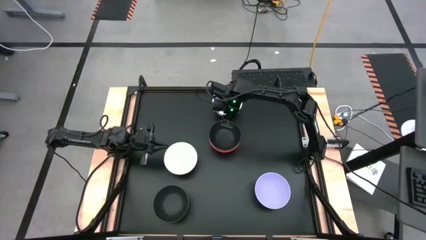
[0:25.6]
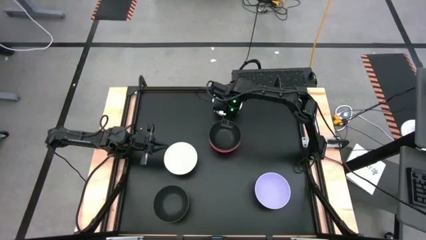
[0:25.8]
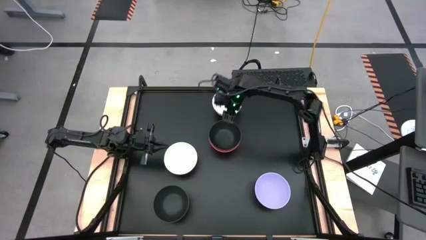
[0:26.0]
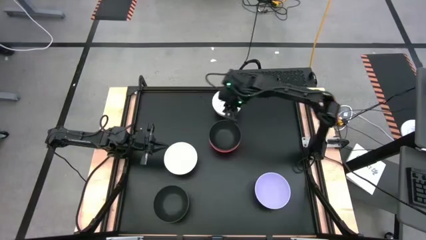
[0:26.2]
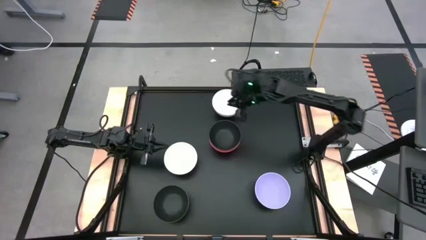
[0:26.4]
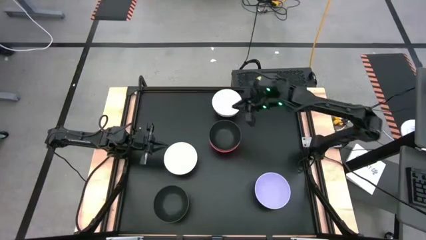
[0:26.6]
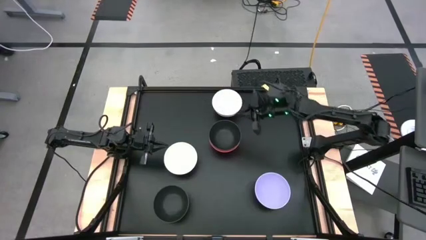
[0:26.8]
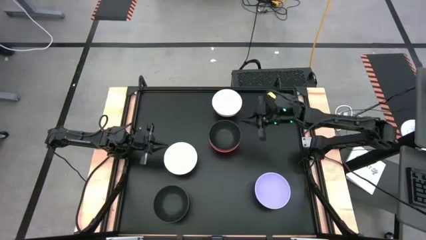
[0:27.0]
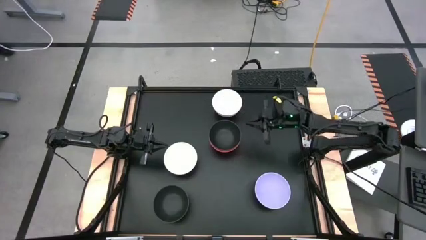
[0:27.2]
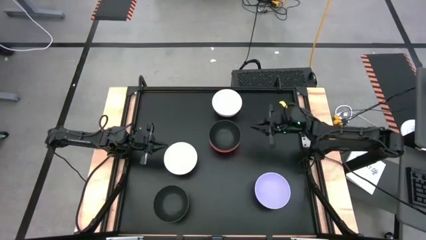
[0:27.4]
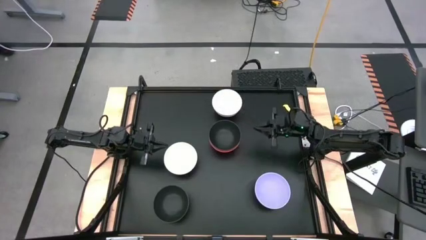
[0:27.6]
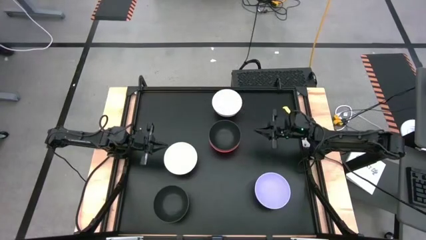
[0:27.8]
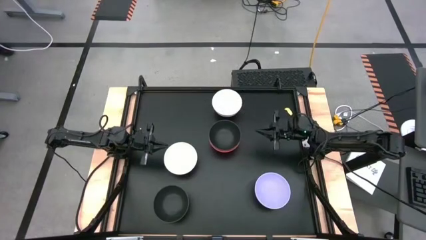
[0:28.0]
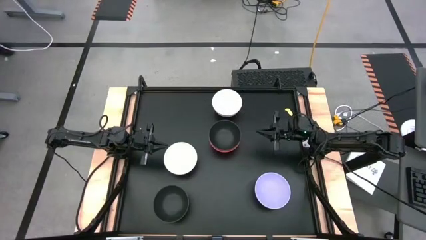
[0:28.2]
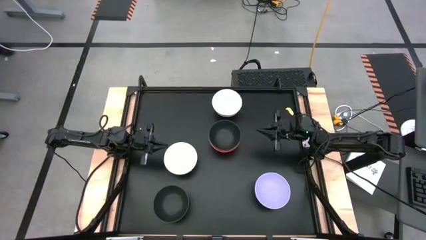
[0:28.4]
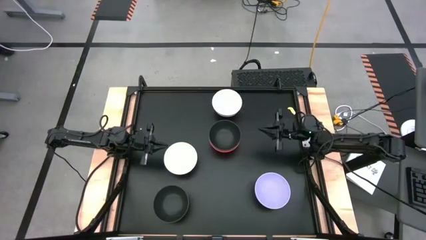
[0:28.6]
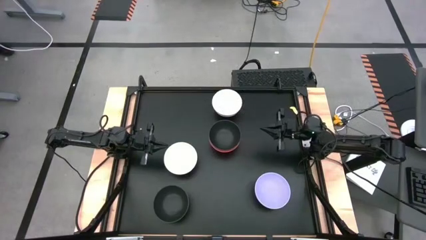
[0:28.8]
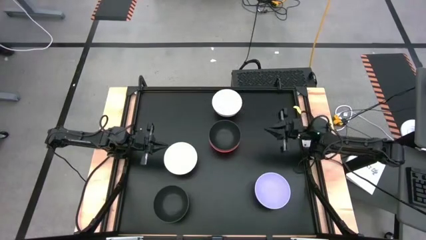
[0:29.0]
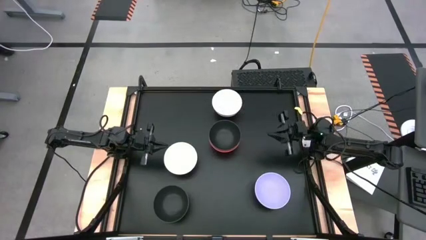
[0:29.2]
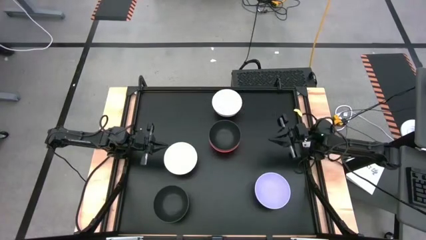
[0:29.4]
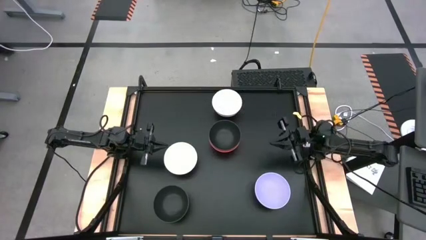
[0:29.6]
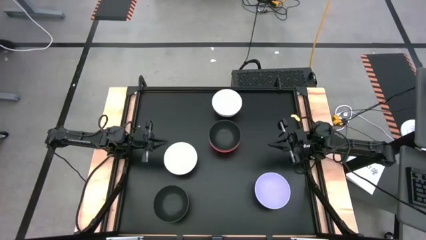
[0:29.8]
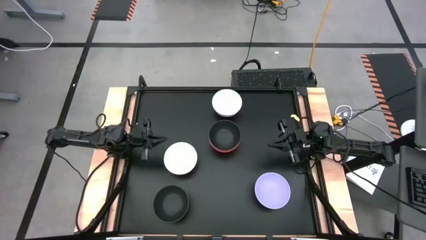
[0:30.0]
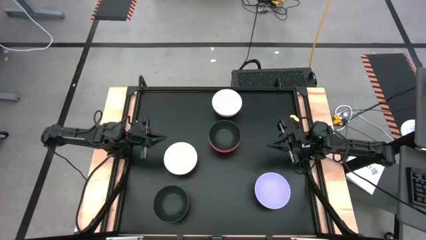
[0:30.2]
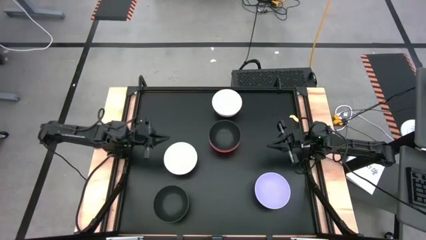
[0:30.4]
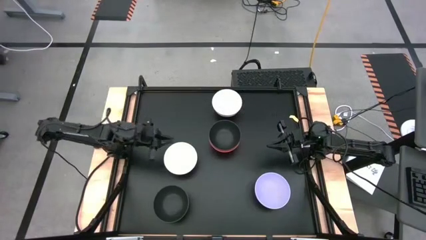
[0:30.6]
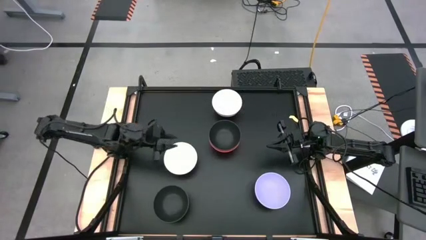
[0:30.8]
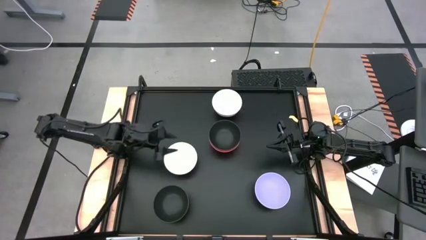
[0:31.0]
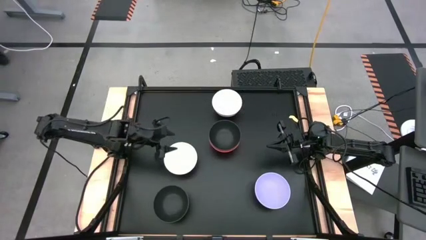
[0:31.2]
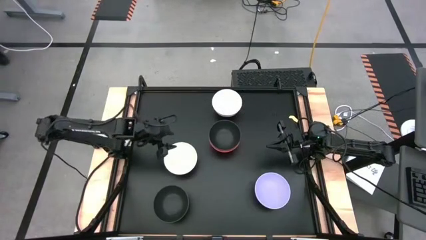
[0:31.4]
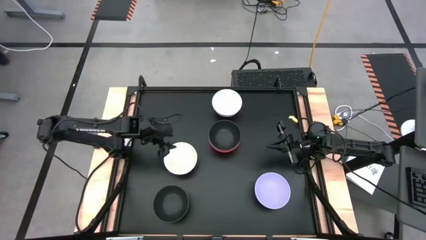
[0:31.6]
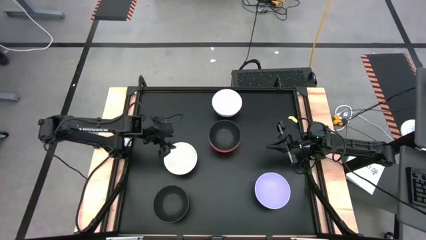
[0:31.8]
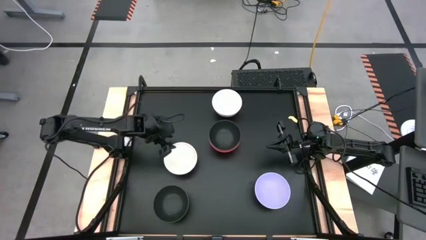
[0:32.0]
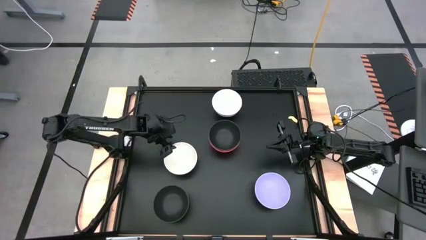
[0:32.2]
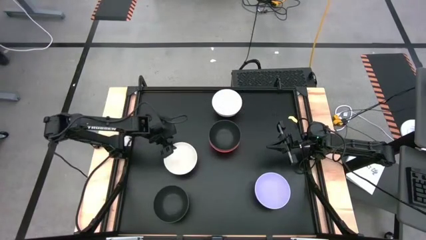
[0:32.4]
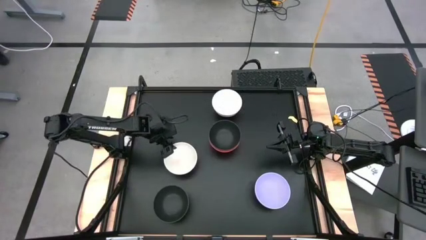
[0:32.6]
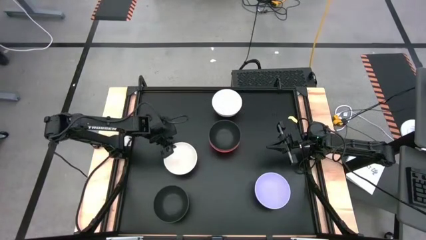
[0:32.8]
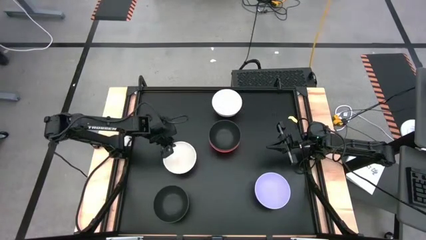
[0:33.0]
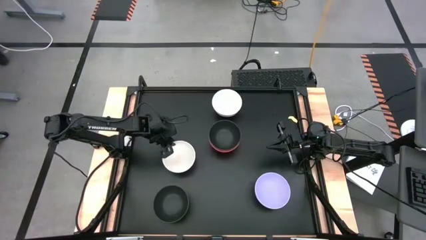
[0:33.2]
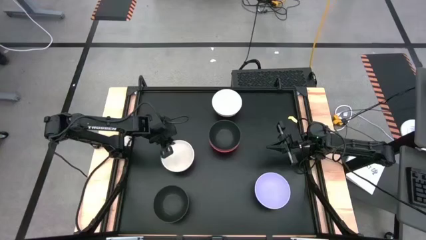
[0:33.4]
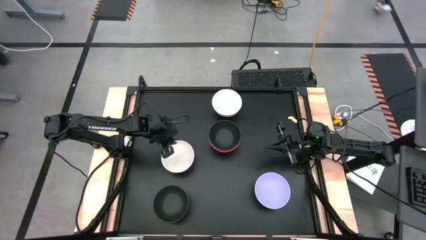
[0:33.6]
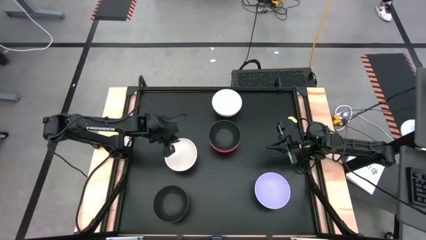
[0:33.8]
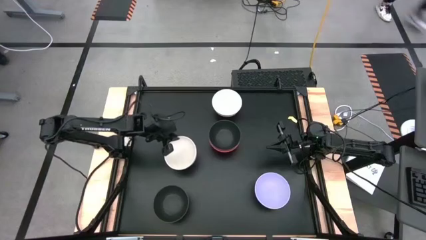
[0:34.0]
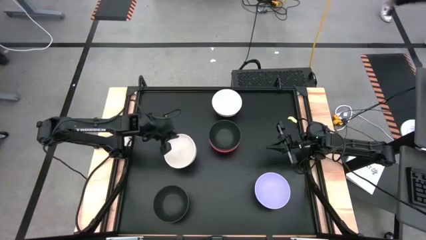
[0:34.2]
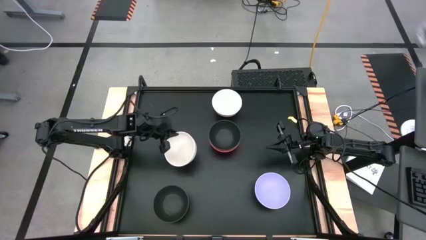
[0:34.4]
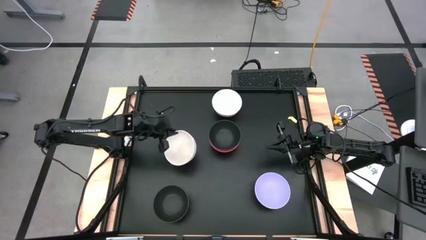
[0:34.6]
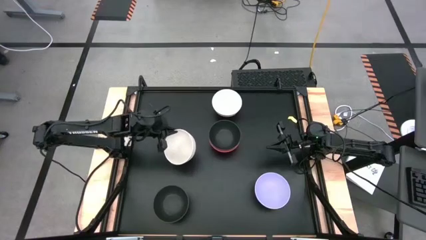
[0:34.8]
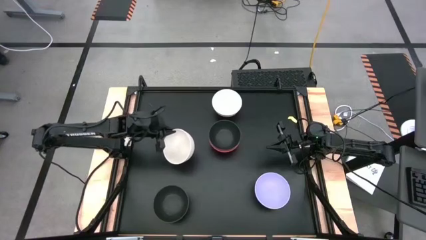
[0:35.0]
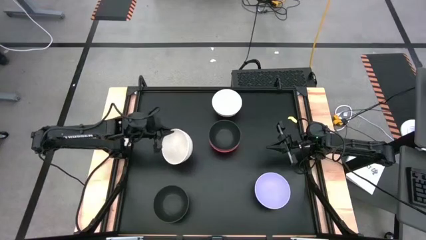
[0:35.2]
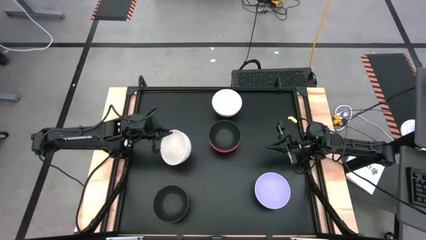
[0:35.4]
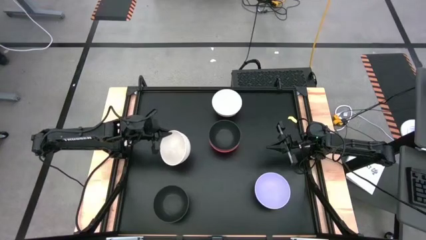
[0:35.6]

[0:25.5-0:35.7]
Task: Nest bowls inside each other
Stack the bottom white bowl on top of the black bowl

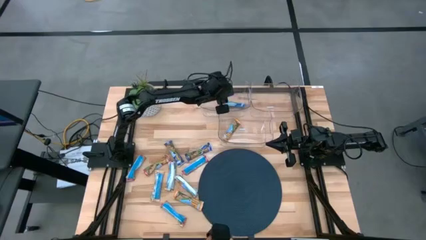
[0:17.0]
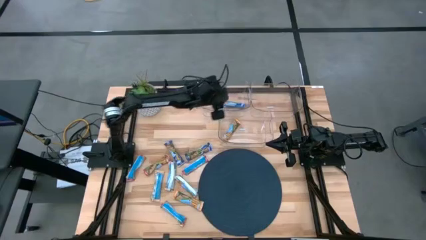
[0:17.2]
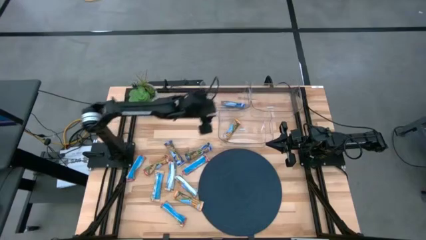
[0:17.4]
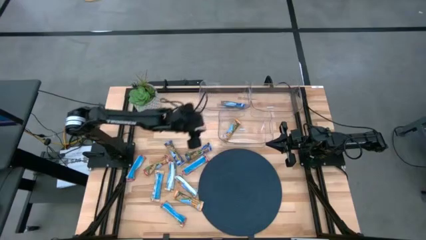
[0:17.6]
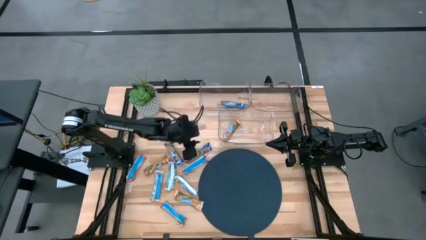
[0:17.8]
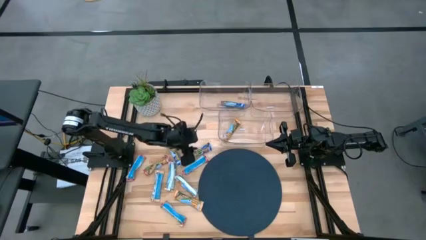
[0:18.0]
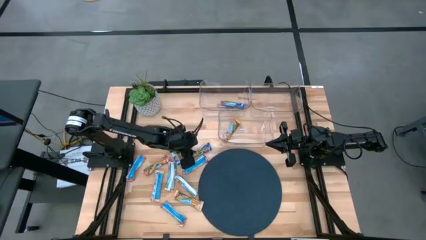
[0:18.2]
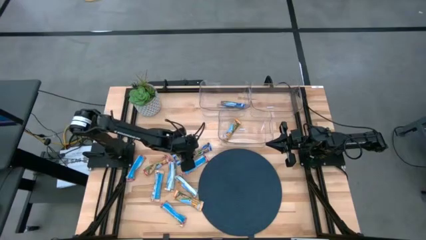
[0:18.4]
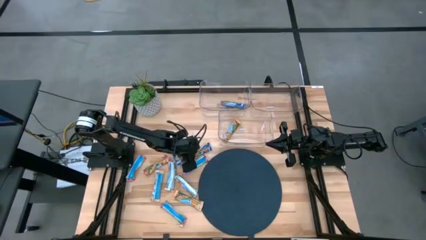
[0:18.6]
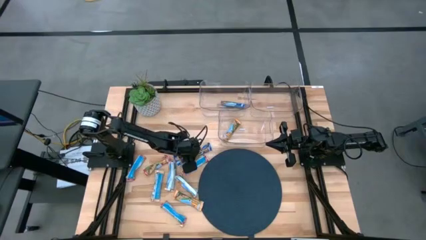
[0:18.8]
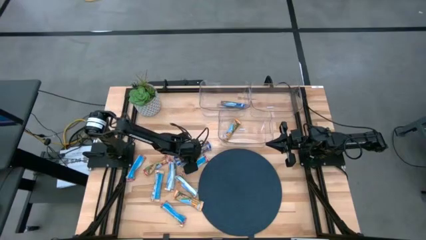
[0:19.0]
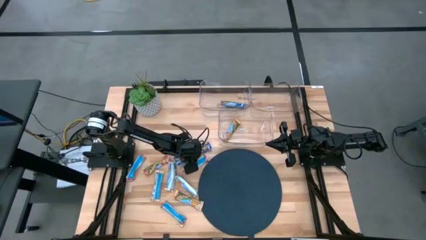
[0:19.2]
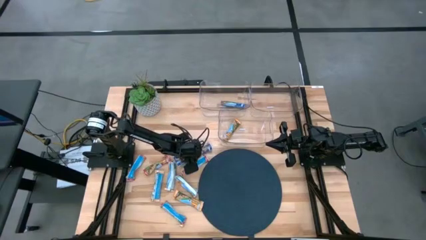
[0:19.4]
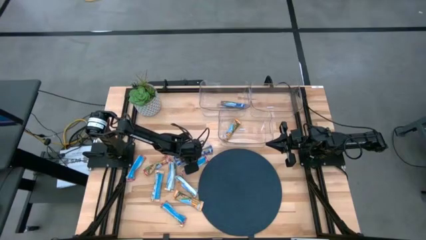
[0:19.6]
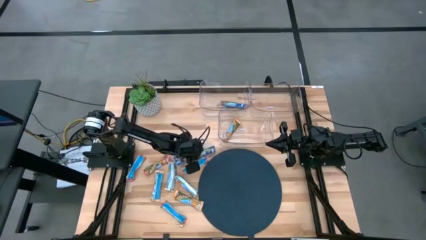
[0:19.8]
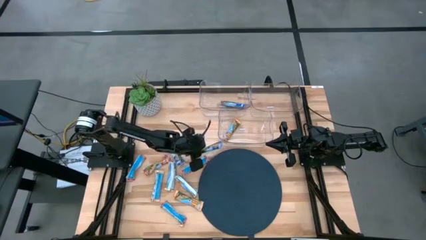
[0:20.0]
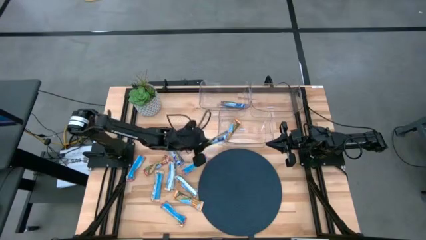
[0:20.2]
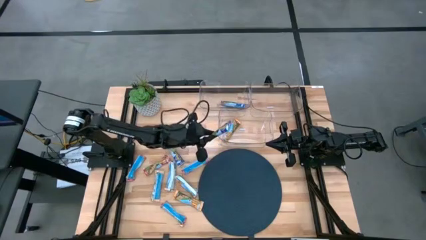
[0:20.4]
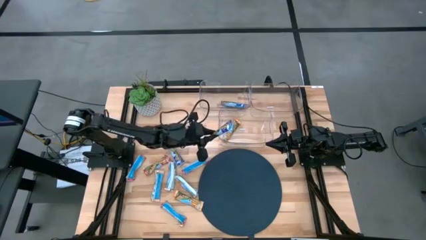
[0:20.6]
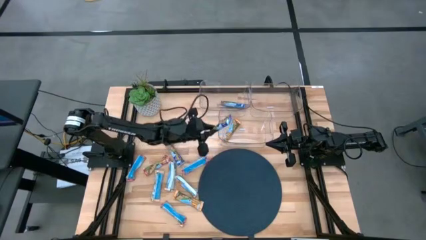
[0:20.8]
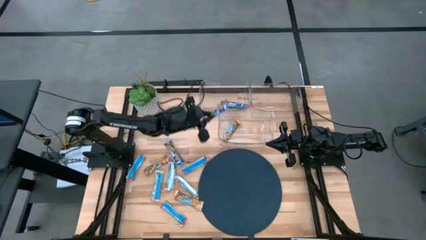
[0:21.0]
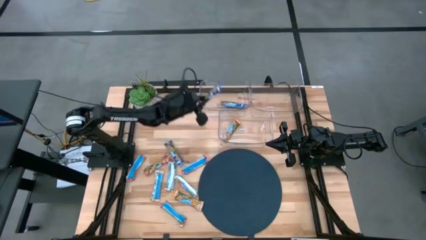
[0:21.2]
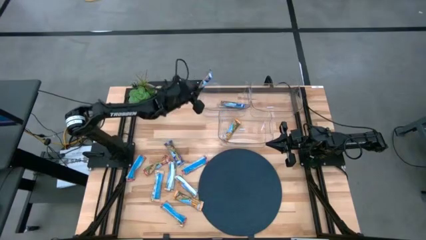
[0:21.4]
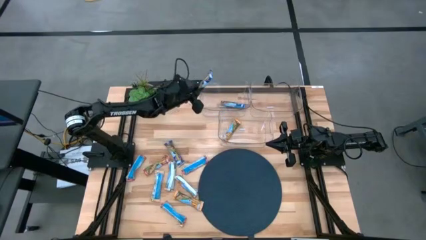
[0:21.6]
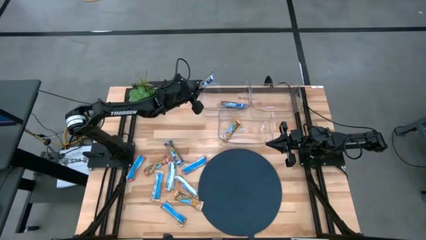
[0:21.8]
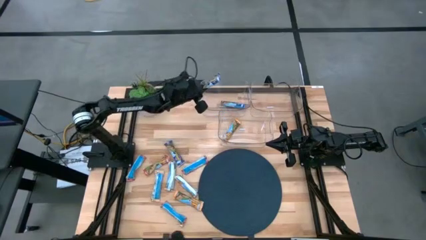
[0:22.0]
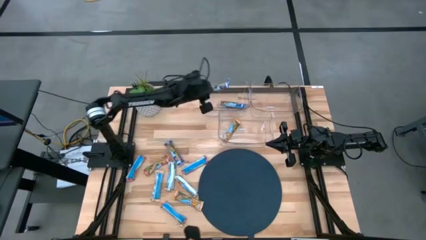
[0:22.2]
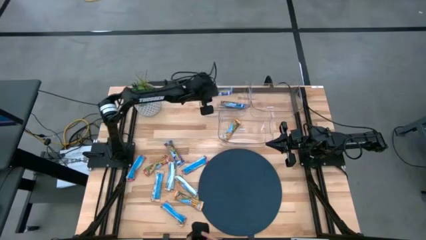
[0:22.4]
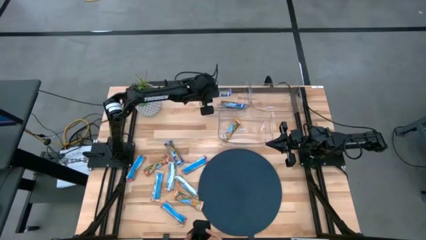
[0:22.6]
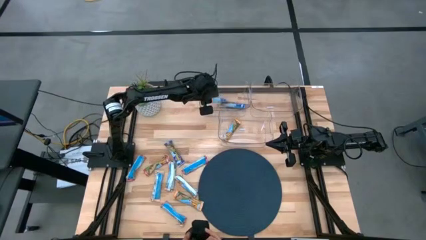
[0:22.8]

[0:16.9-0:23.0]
Task: Pick and place Granola Bars by type
Put the blue granola bar into the top left transparent bin
